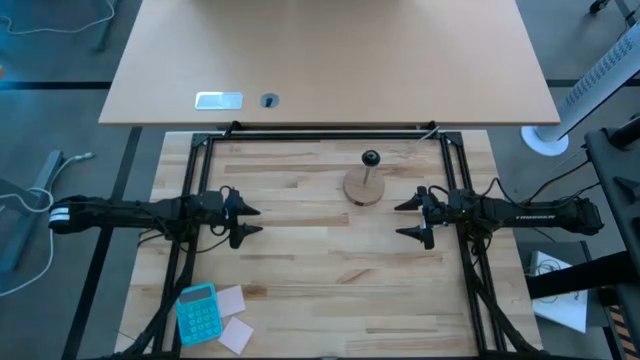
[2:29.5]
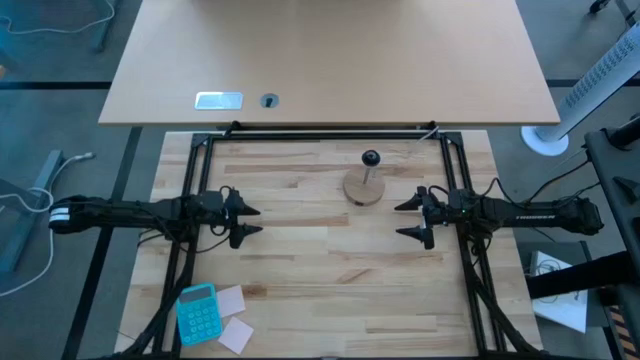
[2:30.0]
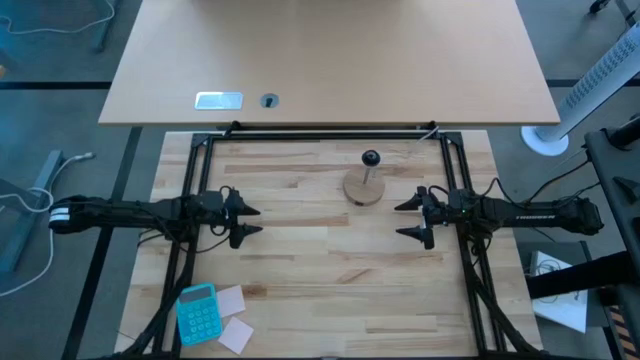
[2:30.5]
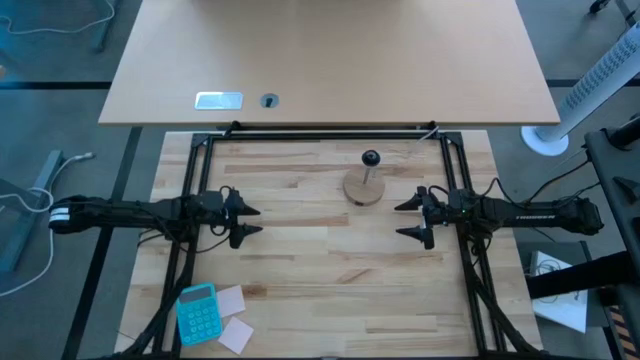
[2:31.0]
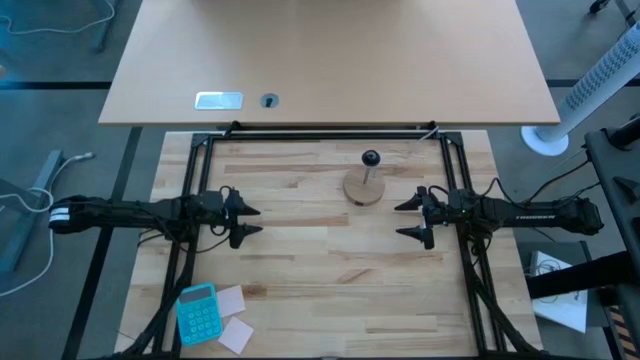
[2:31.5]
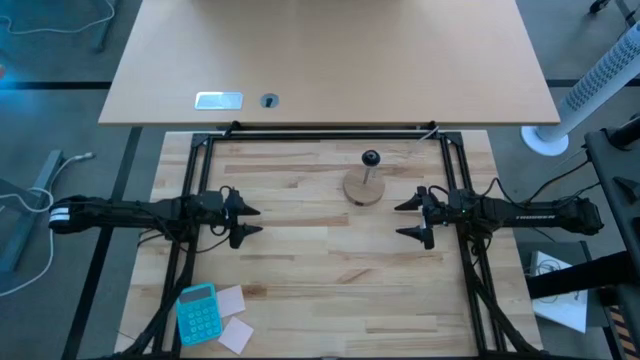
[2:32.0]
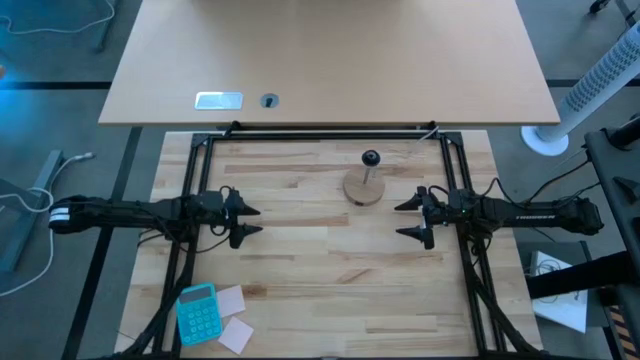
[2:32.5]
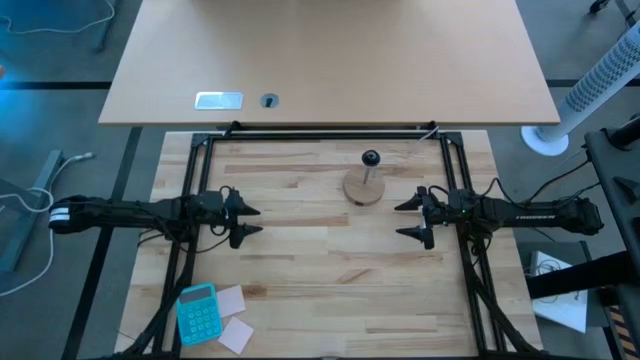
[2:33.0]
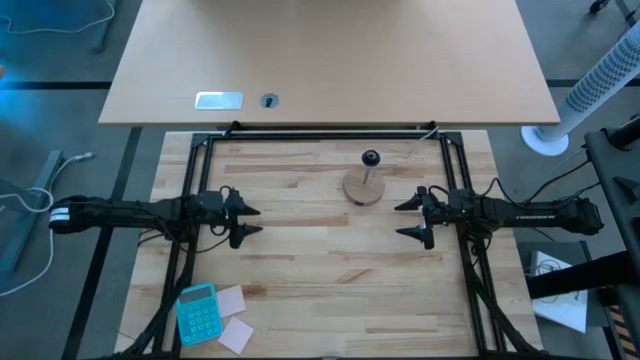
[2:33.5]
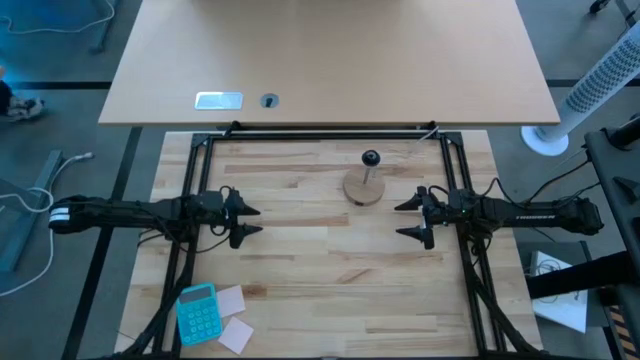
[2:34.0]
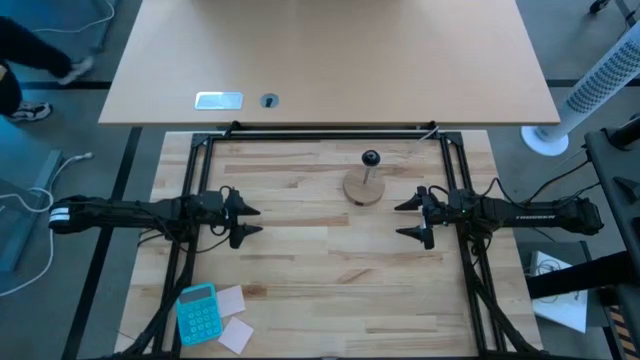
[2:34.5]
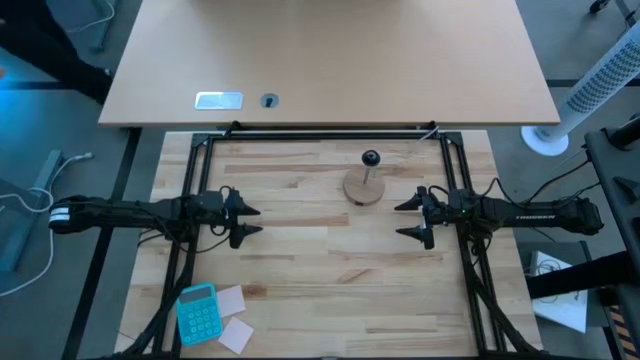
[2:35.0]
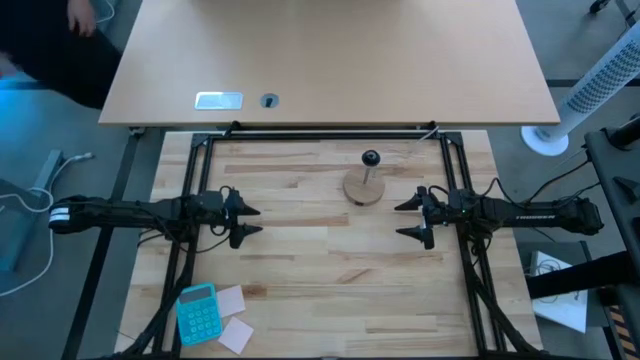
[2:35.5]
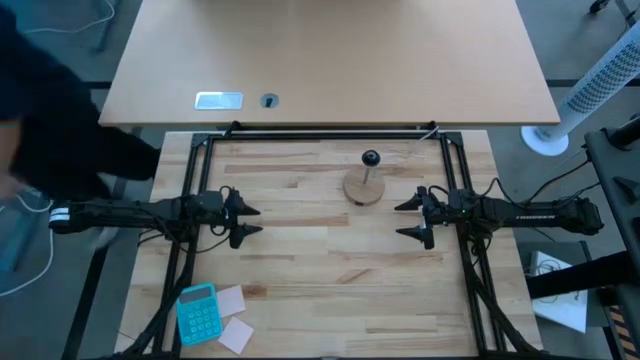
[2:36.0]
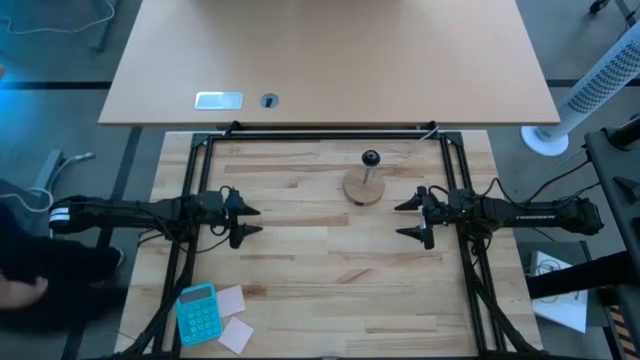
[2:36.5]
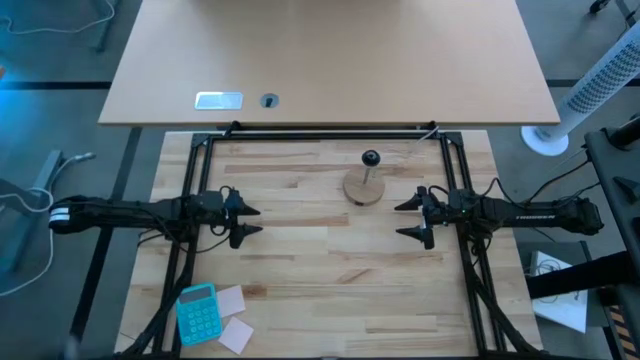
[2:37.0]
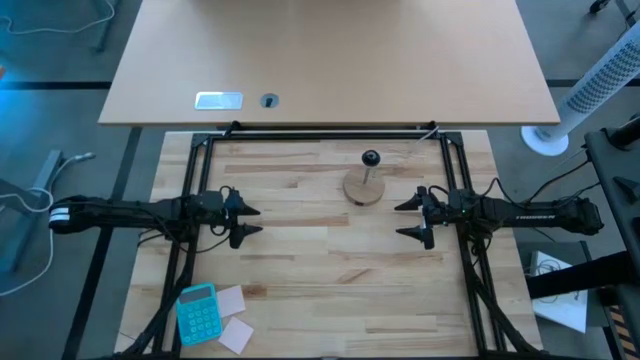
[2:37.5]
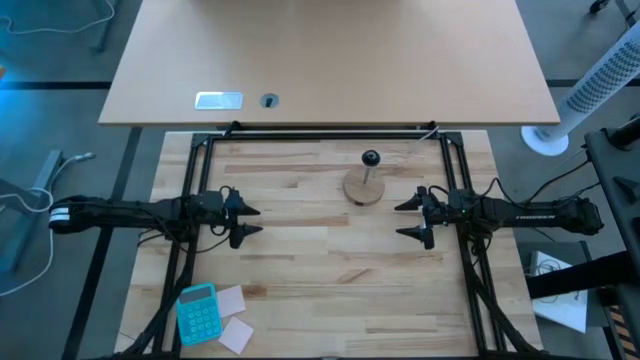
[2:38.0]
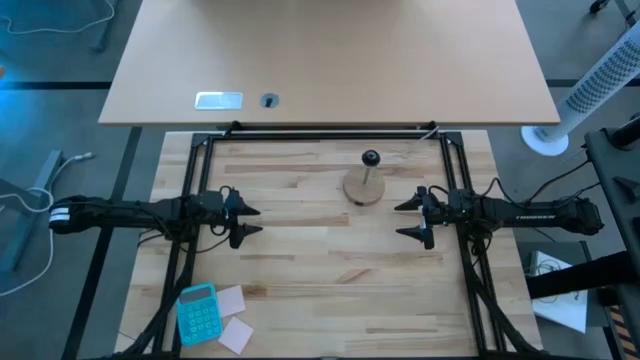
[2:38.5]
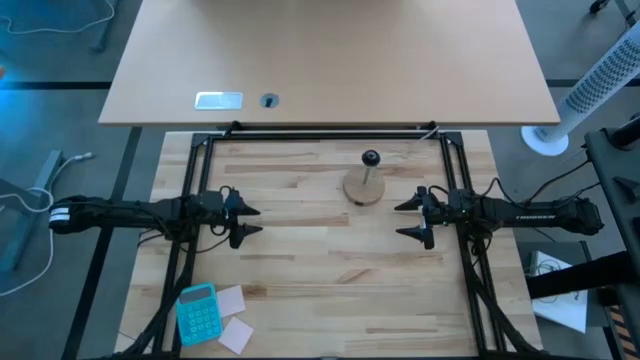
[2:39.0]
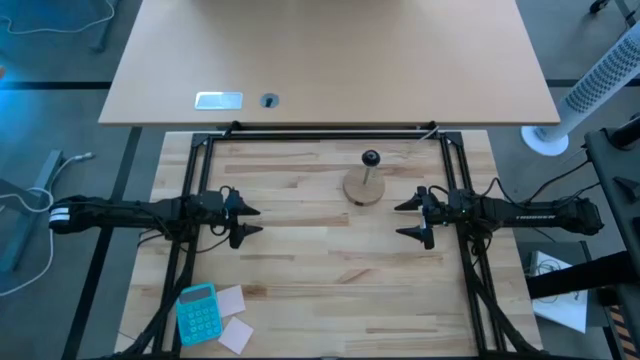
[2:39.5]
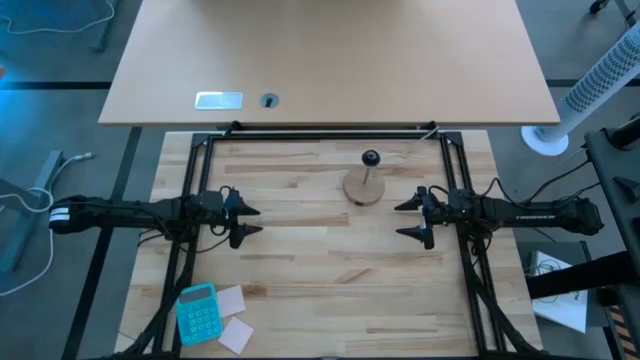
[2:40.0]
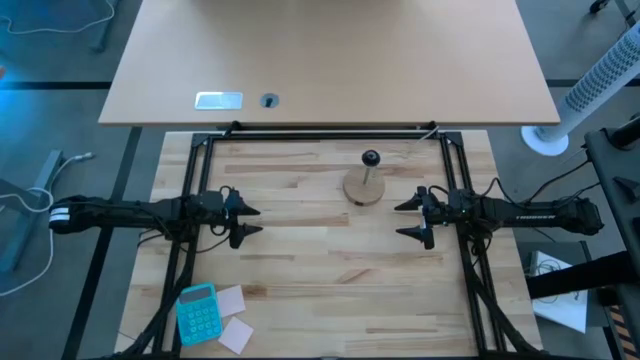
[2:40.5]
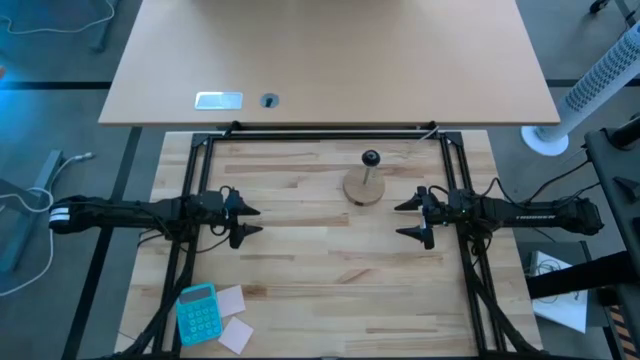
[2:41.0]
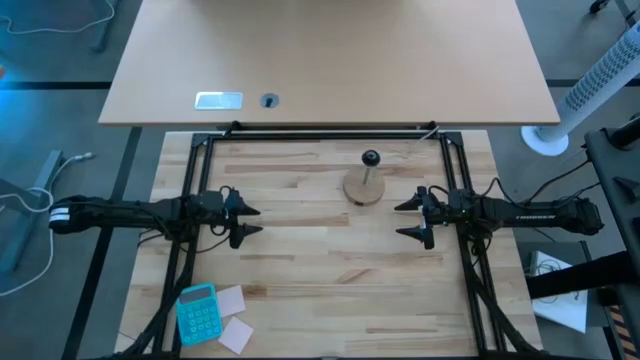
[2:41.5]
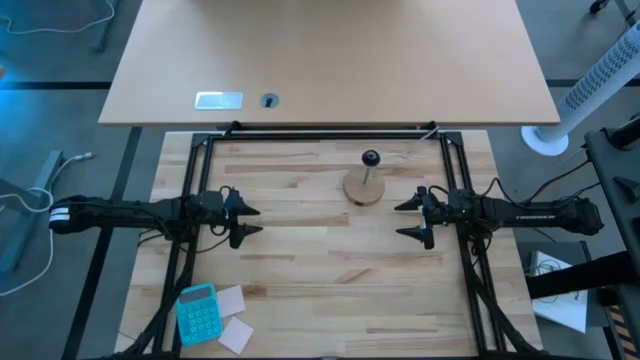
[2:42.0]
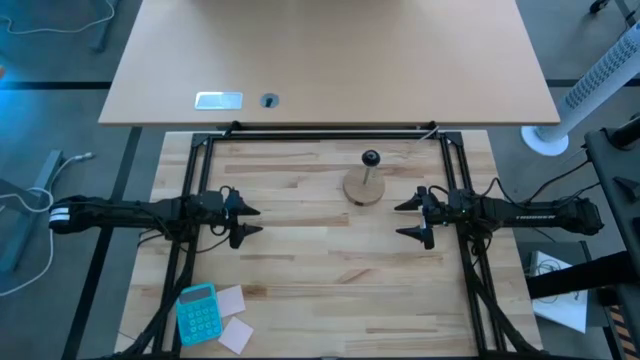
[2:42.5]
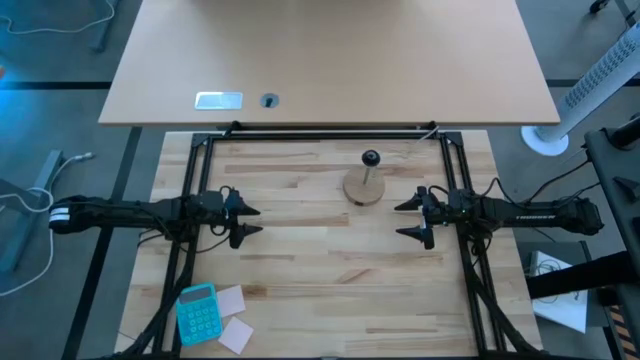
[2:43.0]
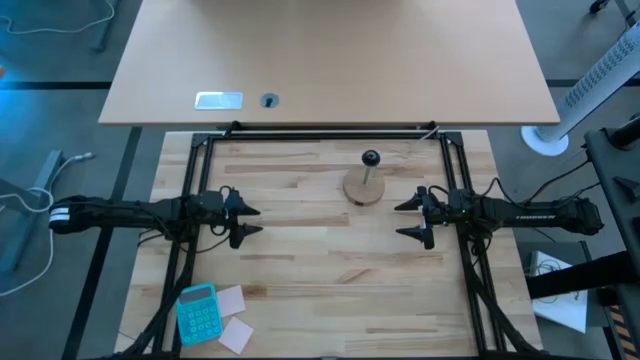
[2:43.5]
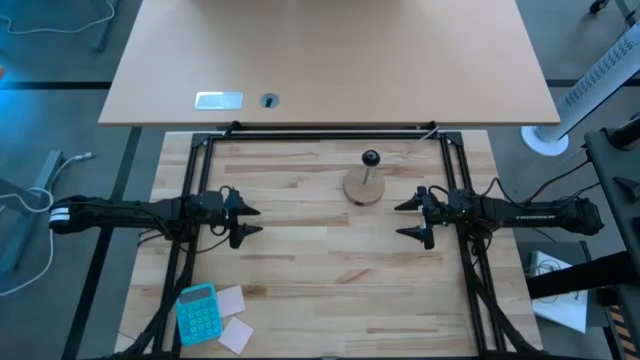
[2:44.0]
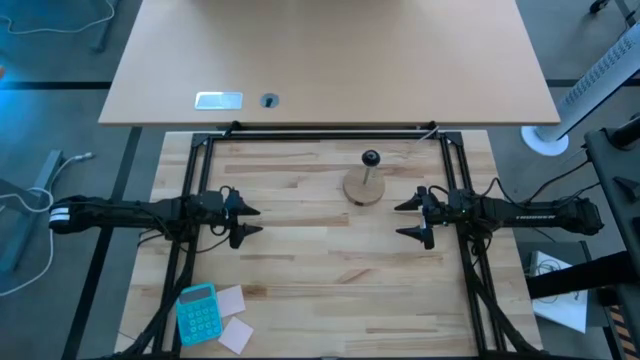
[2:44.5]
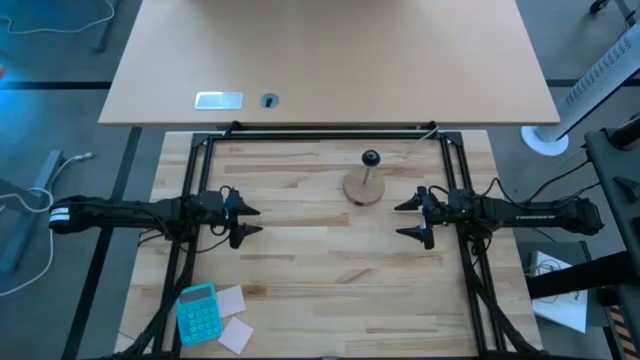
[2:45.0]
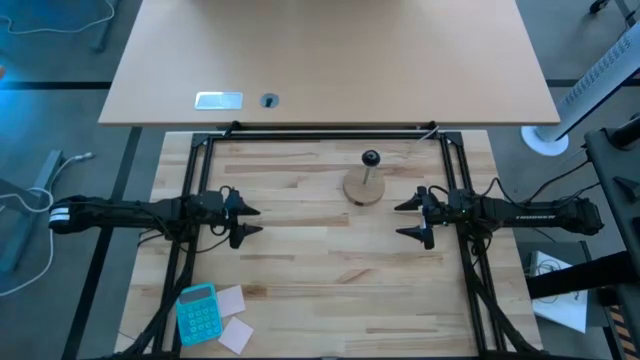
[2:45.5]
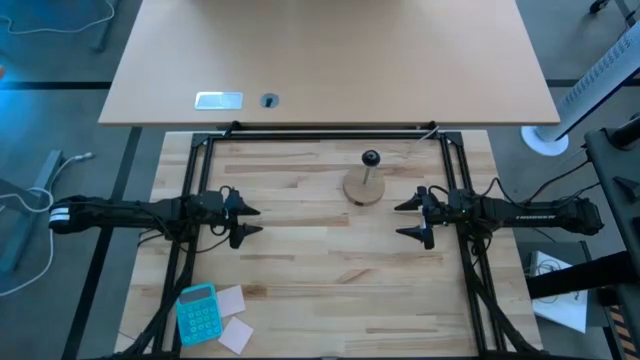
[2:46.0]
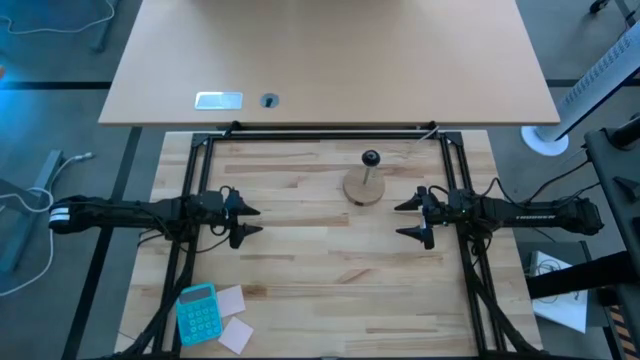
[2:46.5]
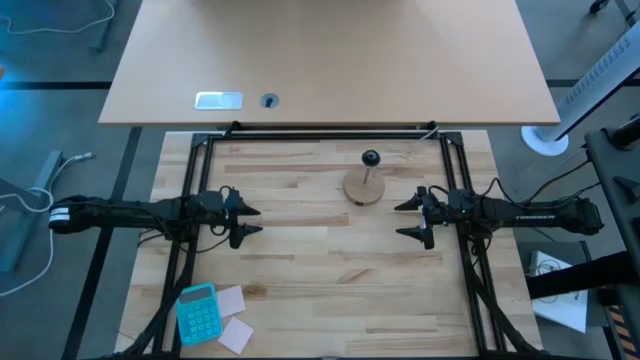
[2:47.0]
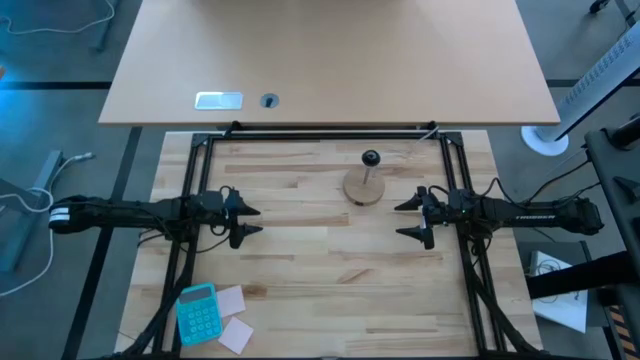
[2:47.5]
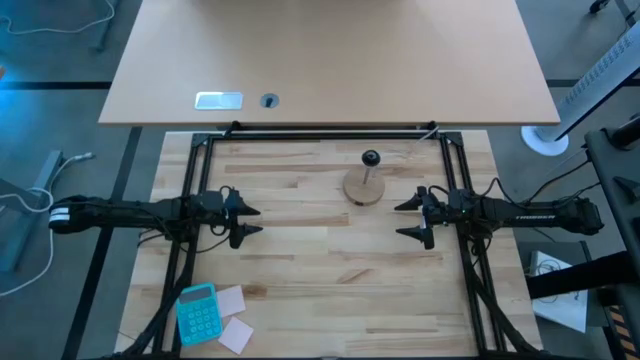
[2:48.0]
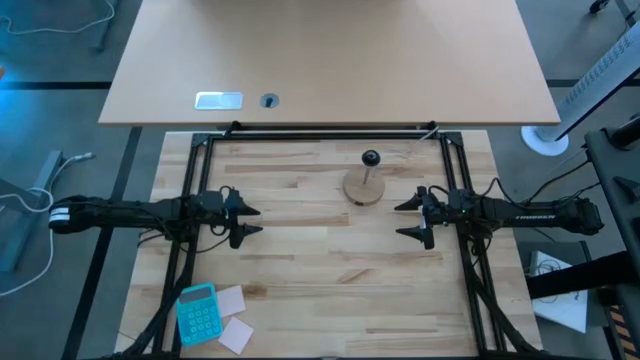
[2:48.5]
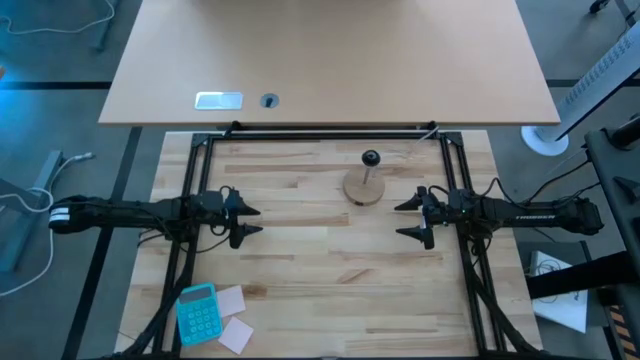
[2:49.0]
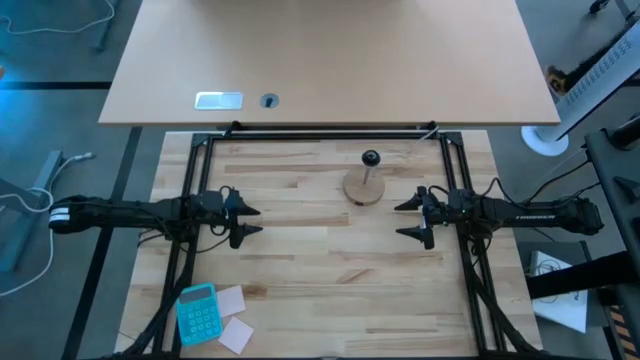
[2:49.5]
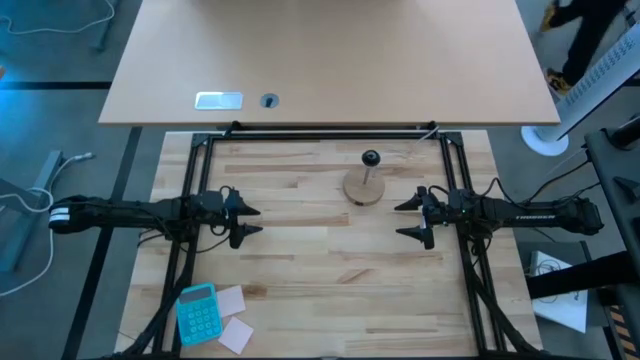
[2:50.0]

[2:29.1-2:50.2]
Task: Screw lightbulb
Return to Home Position
